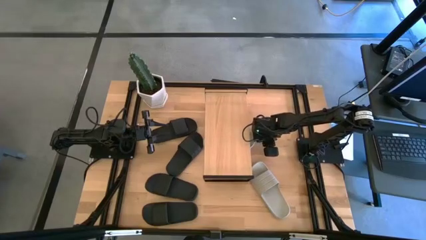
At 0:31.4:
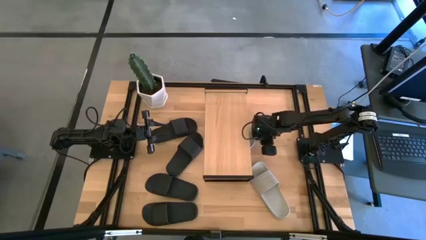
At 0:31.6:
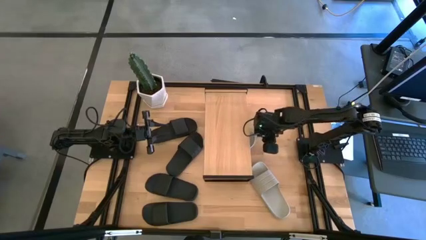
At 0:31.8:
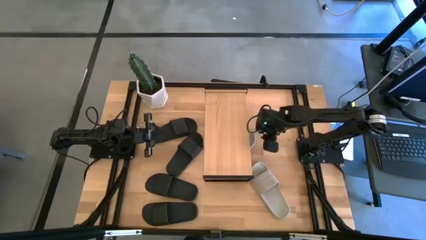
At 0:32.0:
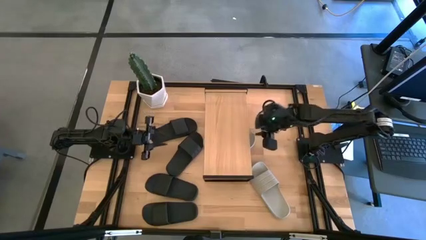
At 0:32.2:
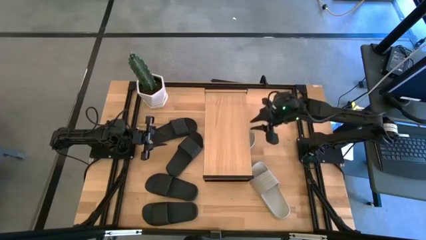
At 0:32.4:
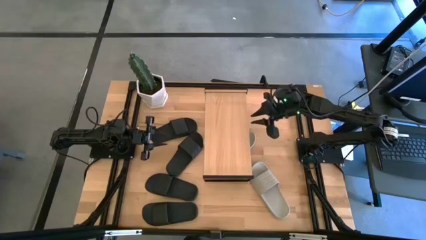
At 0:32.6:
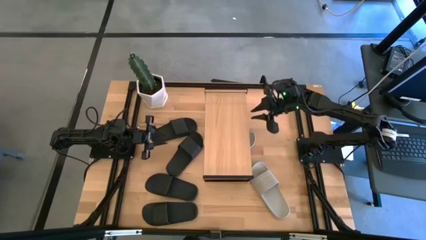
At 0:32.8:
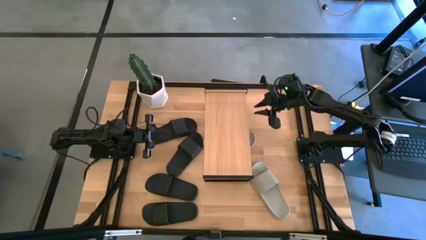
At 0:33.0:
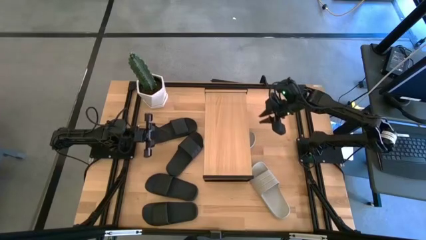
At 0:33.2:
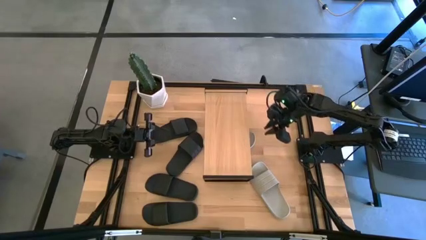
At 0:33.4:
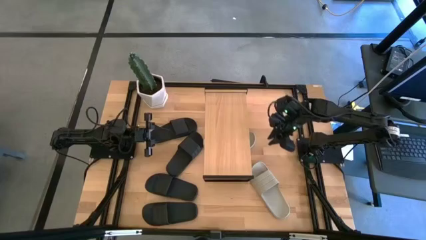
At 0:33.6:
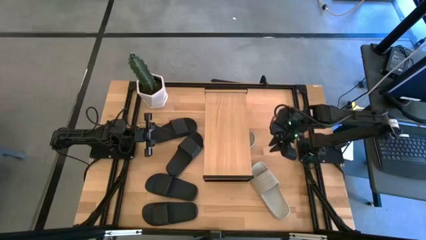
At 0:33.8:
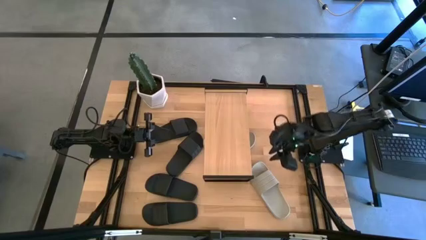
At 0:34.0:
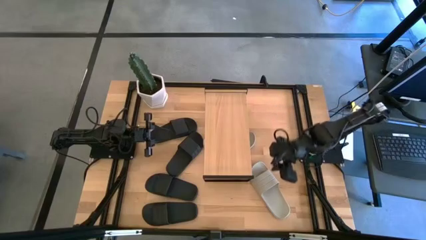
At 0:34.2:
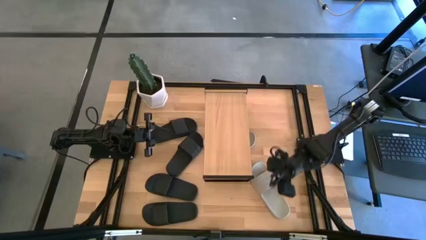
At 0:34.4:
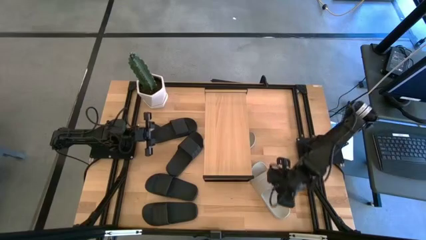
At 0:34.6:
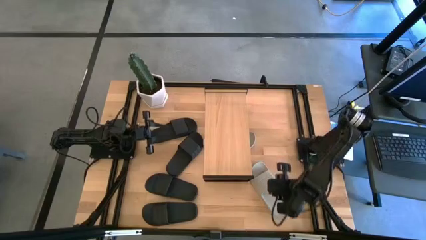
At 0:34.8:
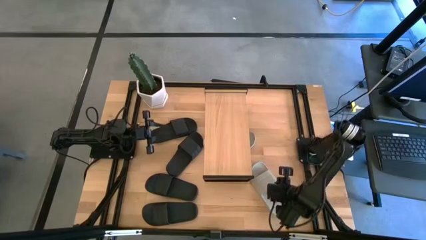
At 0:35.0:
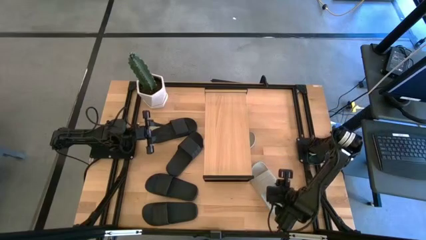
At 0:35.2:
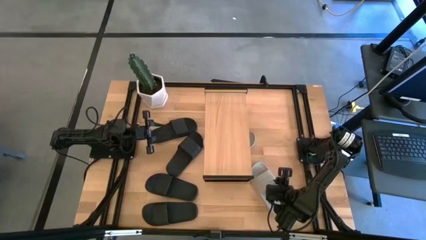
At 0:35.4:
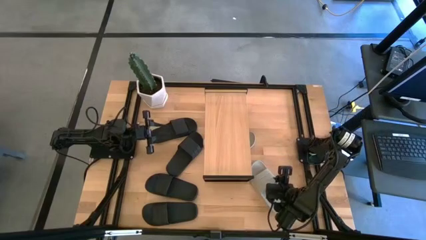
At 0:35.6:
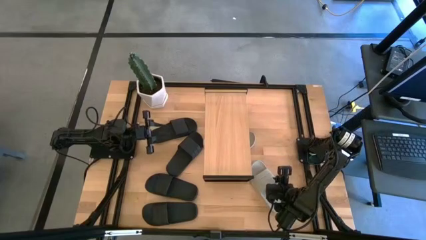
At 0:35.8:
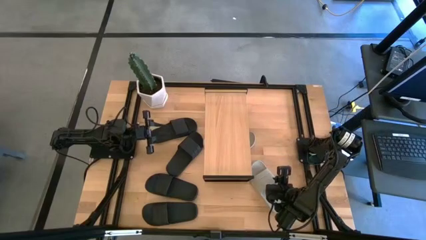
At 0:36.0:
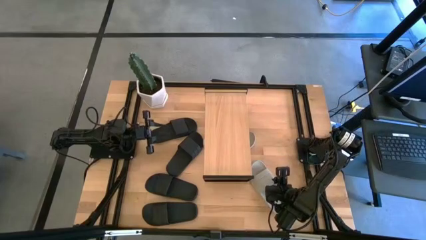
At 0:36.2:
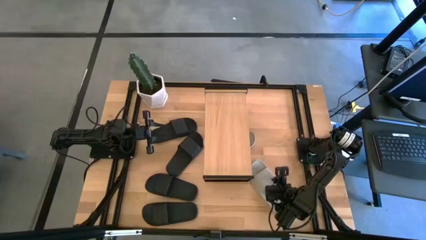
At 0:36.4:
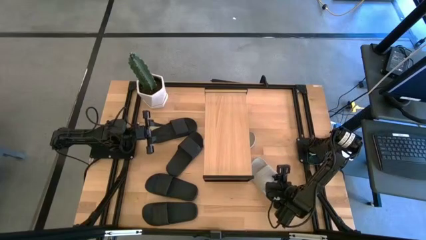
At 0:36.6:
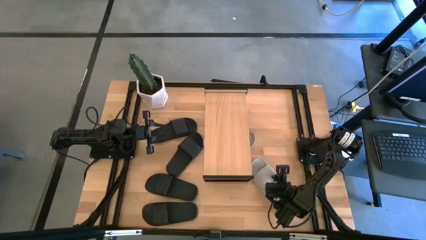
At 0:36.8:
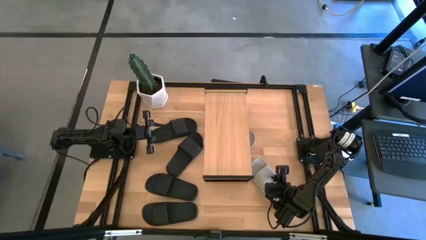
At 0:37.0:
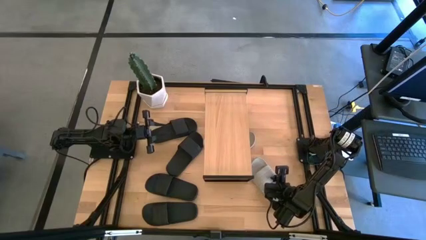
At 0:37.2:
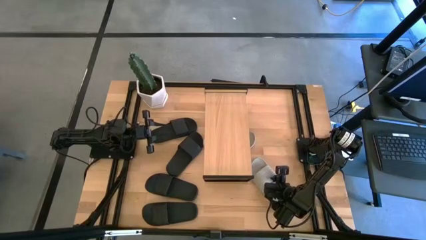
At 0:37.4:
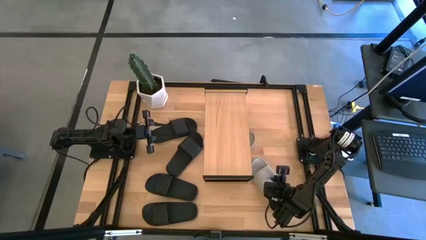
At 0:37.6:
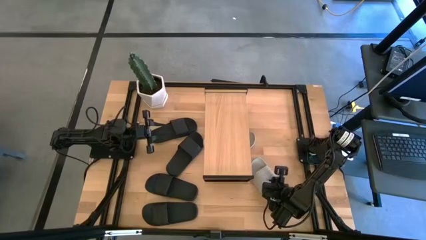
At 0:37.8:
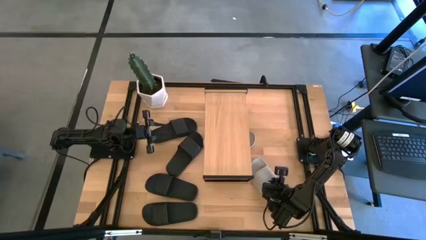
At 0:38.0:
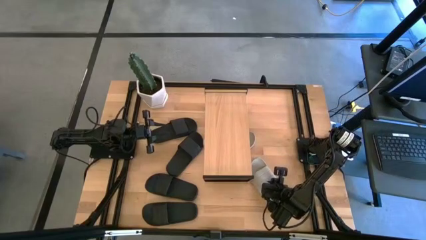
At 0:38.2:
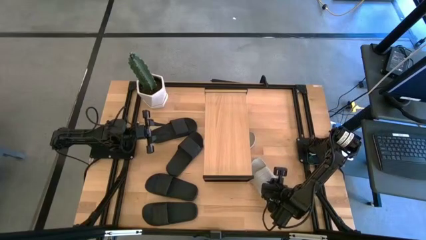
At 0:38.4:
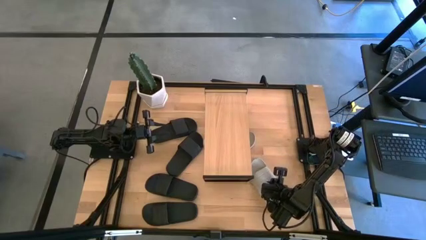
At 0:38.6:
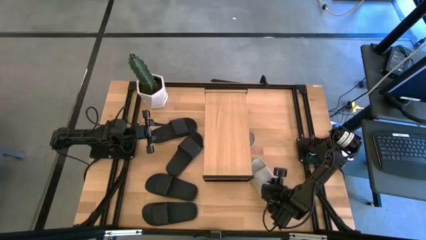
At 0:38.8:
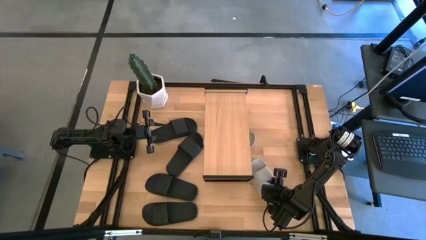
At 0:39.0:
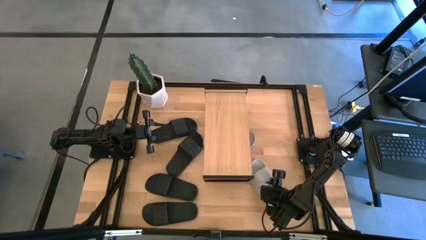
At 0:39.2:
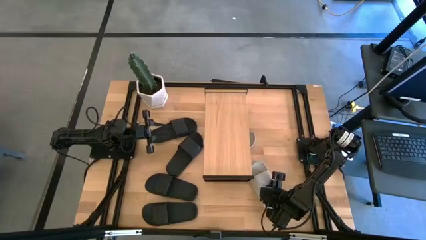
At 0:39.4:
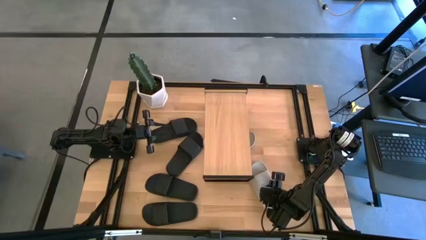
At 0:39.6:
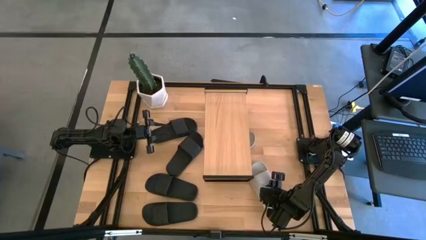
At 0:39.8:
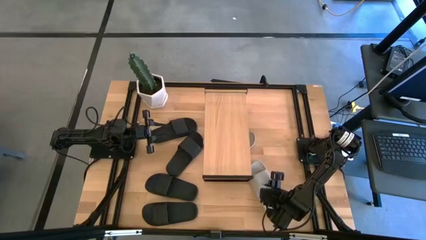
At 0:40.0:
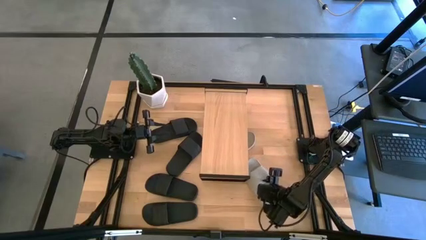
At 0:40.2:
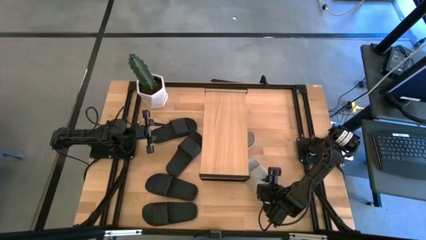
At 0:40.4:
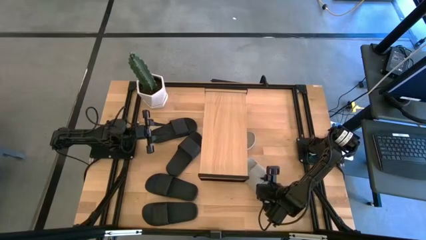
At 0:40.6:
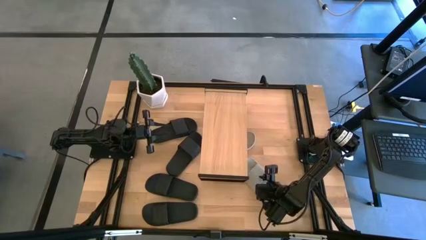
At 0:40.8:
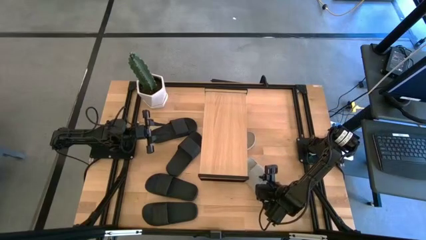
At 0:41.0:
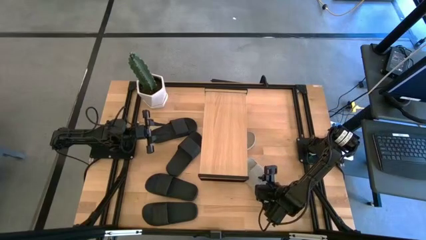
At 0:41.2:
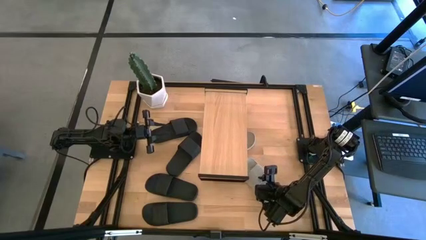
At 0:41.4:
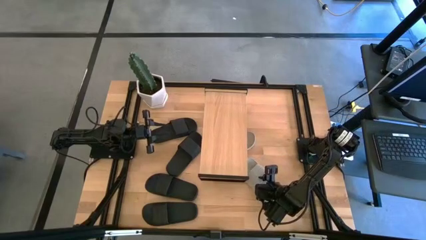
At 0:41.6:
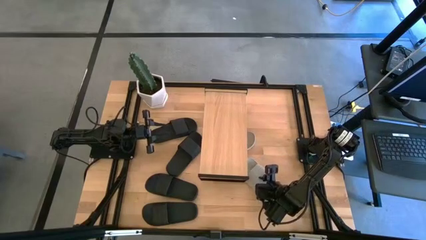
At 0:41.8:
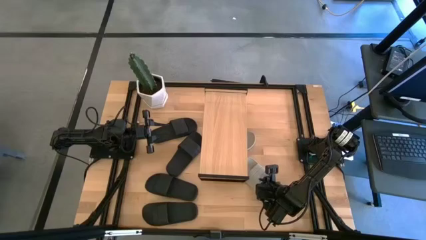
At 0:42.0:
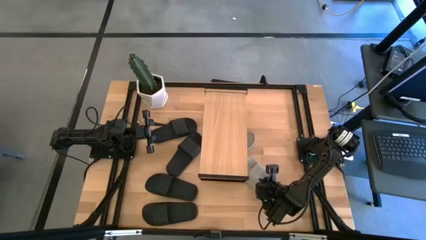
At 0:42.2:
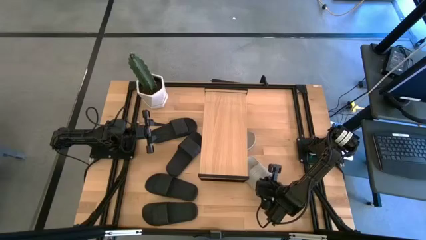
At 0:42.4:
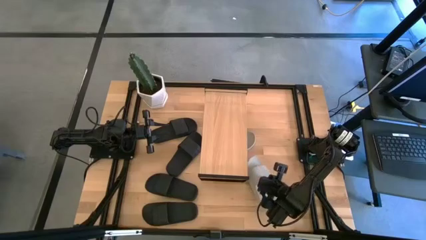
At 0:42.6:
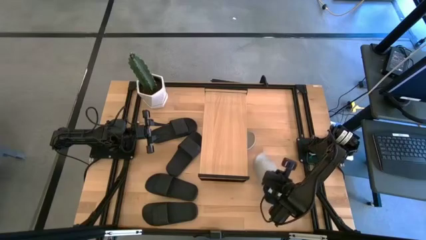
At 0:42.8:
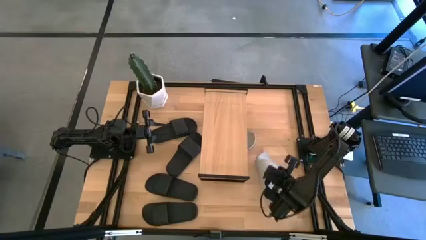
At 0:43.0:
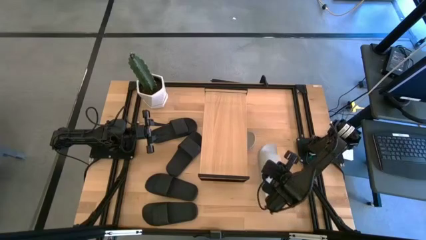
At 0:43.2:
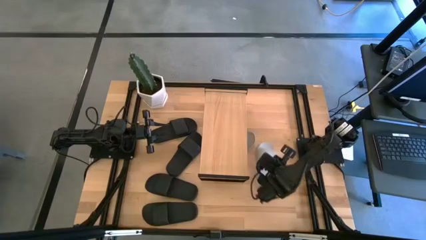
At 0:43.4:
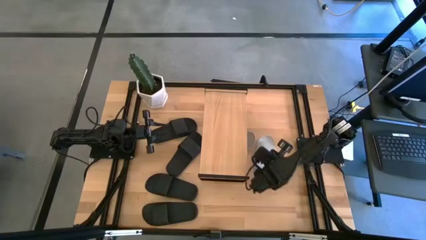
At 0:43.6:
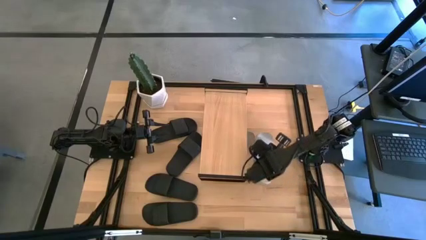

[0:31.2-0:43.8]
Task: Pick and place slides into the shelf
Put the gray slipper under the shelf

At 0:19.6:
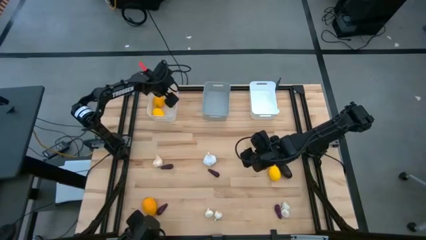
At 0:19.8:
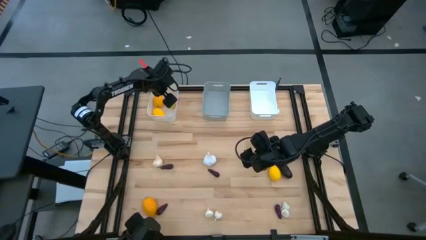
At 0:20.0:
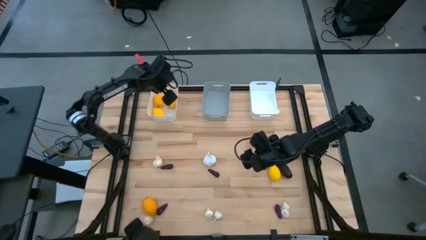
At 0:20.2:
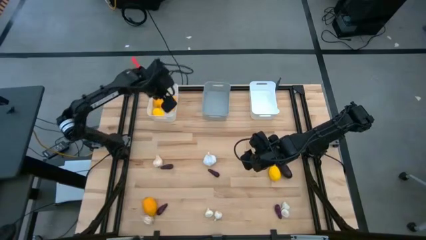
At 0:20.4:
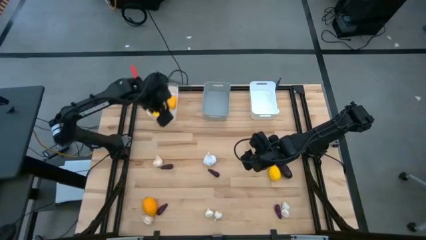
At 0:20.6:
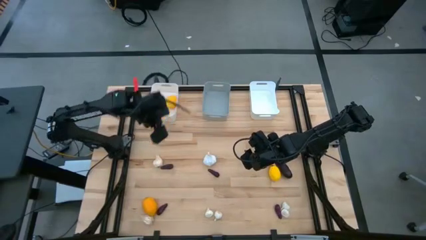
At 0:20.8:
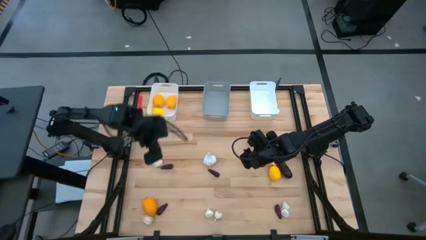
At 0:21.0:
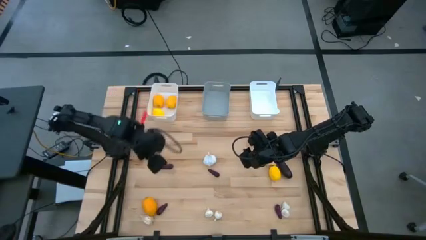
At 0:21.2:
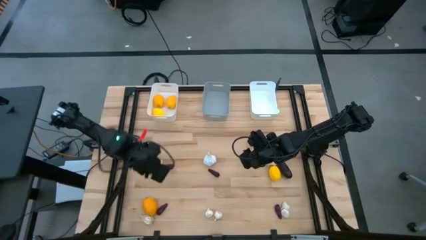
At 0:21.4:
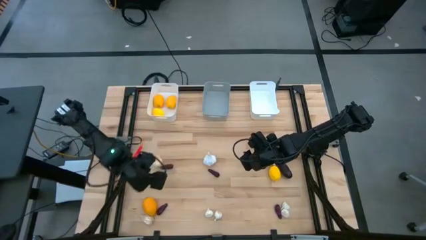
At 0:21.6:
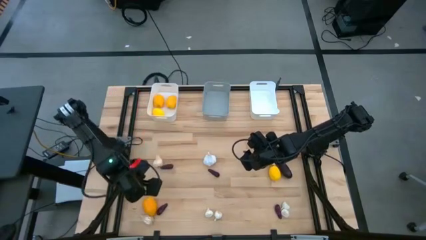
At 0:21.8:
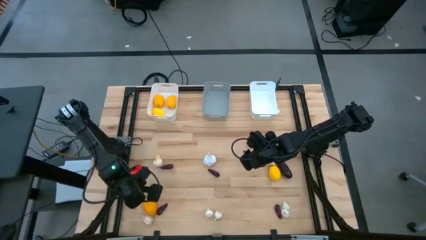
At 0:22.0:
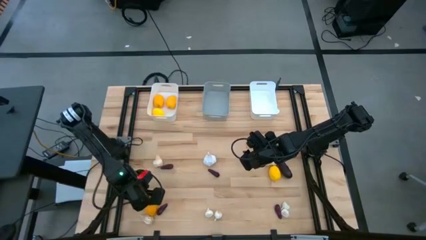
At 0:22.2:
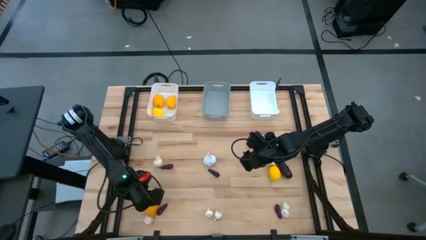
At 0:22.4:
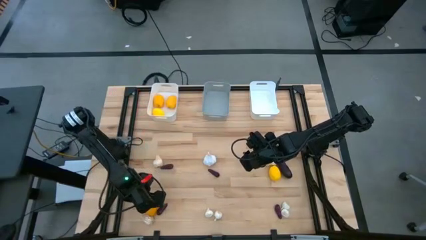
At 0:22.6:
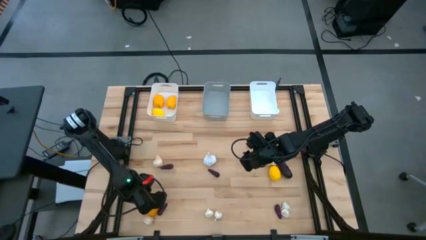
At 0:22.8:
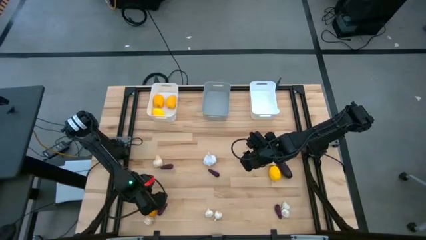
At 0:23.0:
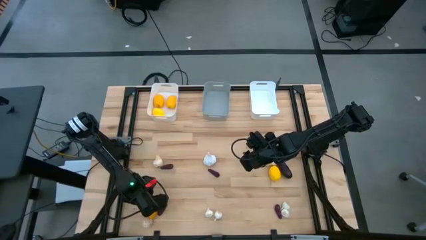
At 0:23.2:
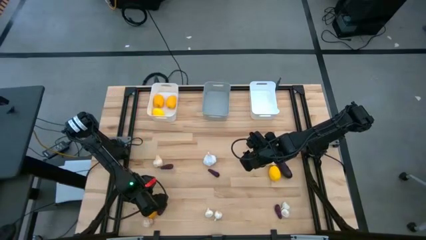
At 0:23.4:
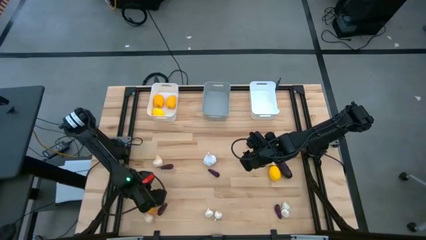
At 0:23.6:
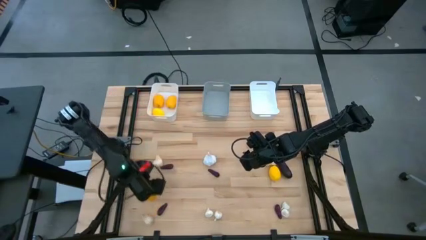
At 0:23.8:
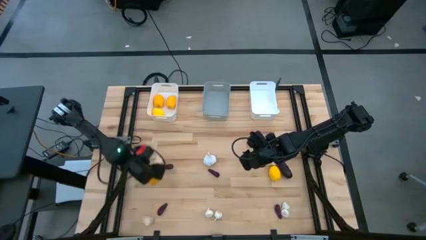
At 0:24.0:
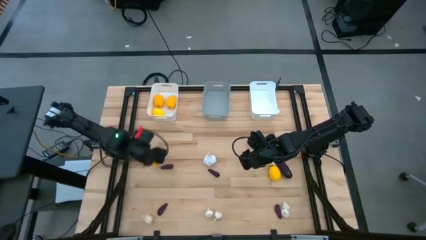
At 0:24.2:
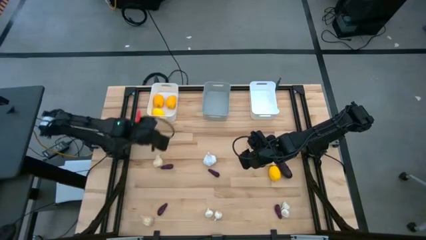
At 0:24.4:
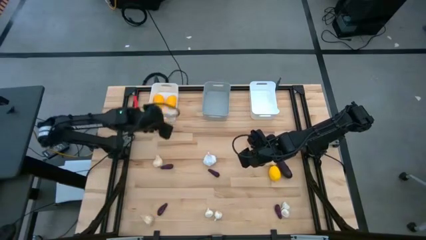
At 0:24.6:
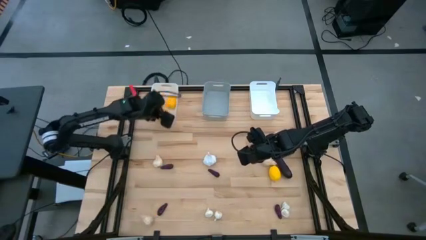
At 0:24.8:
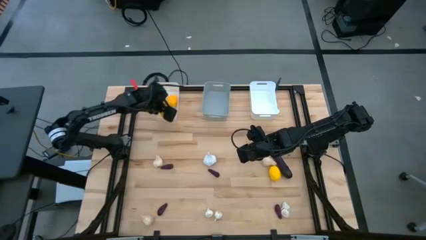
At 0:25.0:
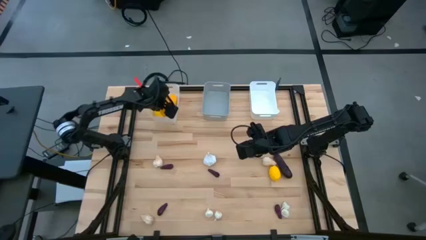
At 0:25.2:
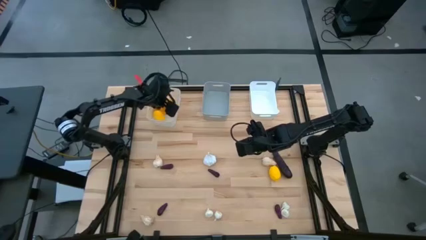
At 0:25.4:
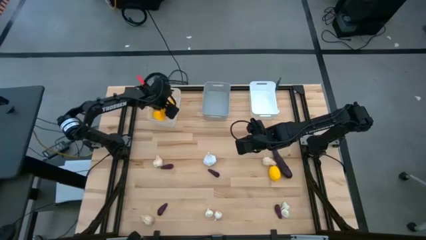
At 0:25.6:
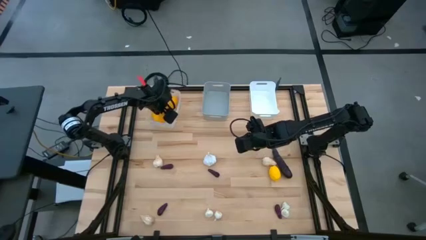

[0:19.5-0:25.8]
Task: Sort produce into baskets
Put the lemon into the left white bin
